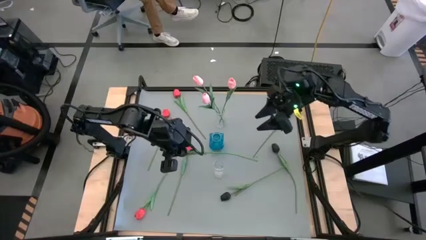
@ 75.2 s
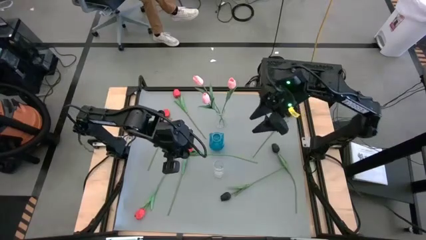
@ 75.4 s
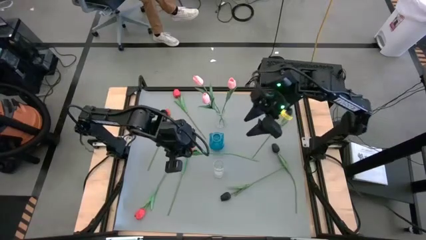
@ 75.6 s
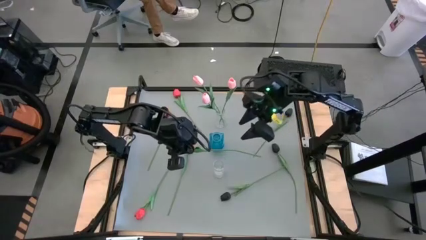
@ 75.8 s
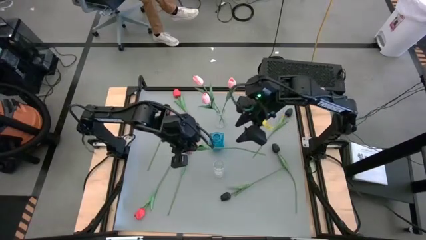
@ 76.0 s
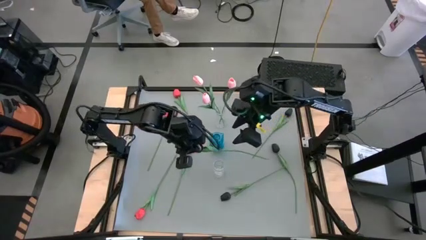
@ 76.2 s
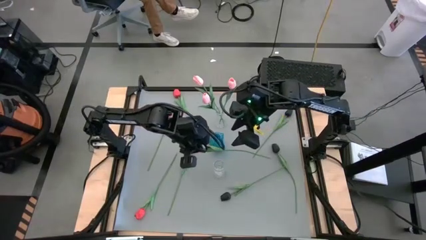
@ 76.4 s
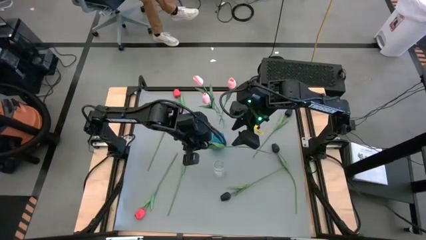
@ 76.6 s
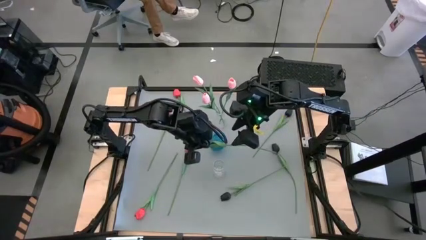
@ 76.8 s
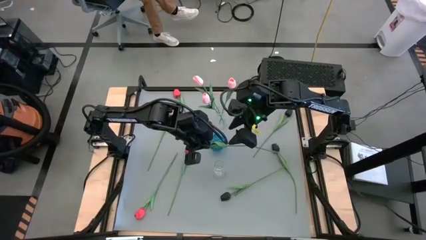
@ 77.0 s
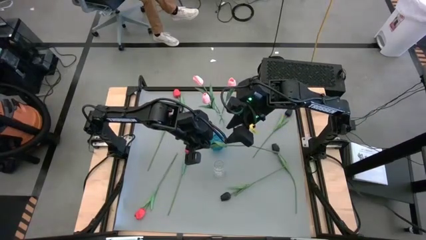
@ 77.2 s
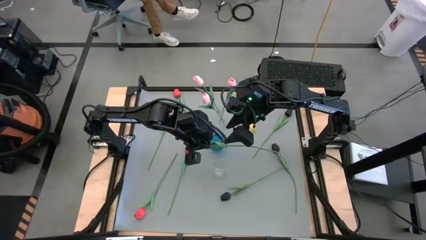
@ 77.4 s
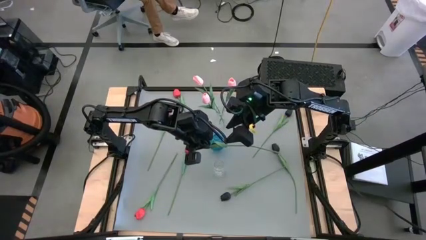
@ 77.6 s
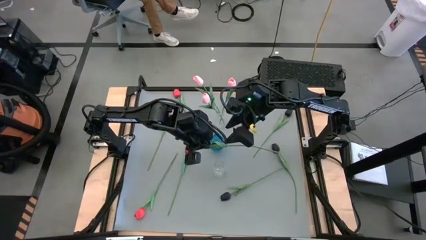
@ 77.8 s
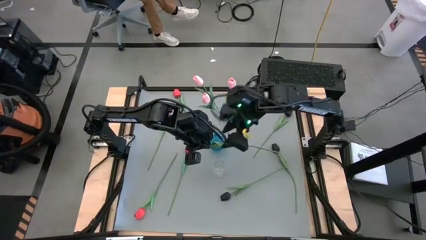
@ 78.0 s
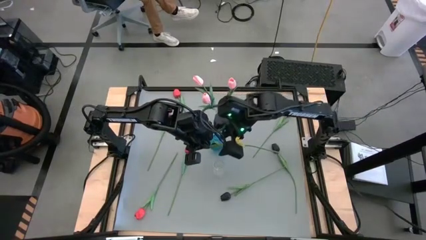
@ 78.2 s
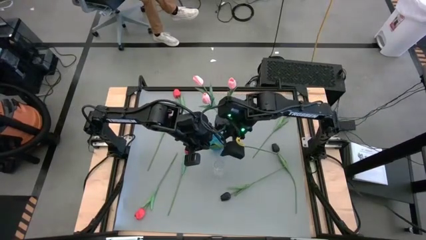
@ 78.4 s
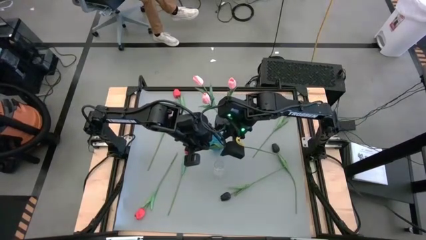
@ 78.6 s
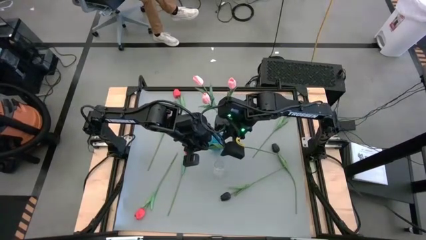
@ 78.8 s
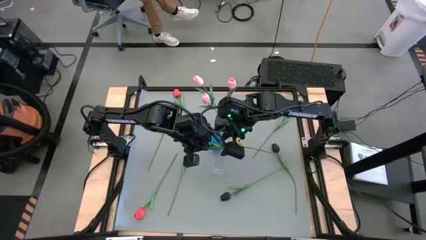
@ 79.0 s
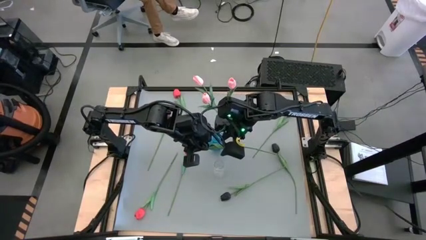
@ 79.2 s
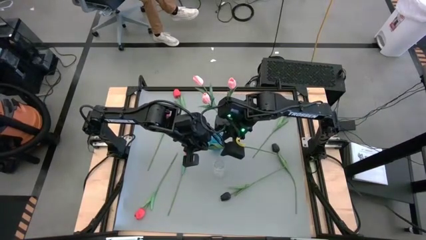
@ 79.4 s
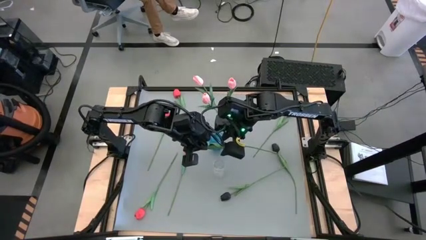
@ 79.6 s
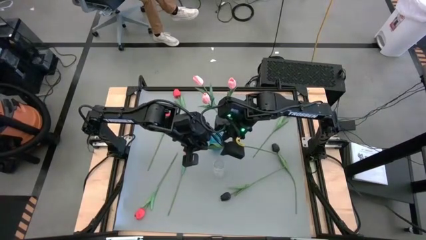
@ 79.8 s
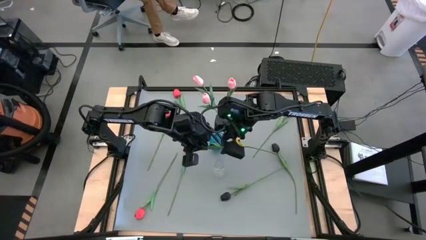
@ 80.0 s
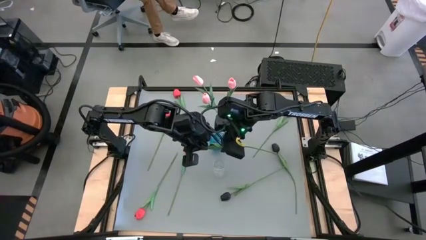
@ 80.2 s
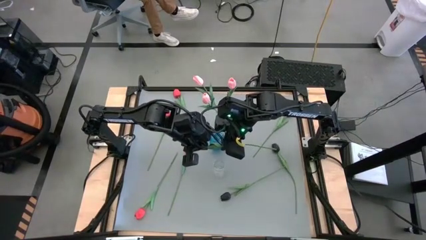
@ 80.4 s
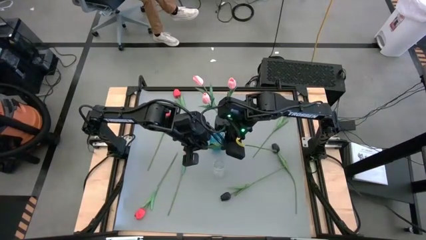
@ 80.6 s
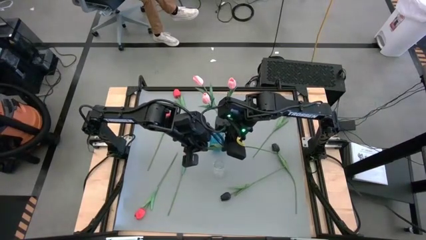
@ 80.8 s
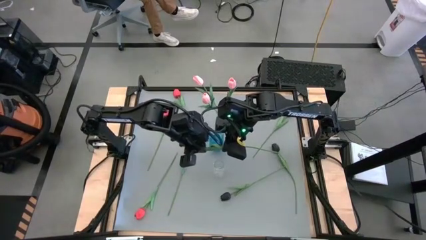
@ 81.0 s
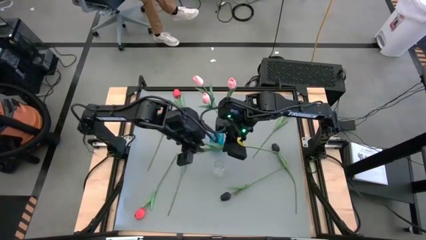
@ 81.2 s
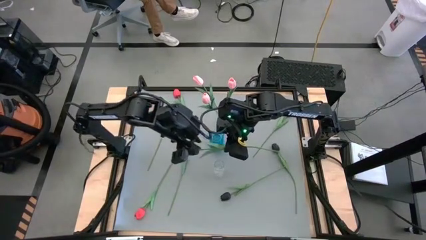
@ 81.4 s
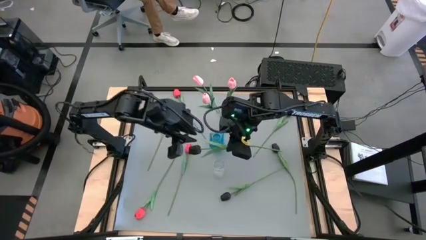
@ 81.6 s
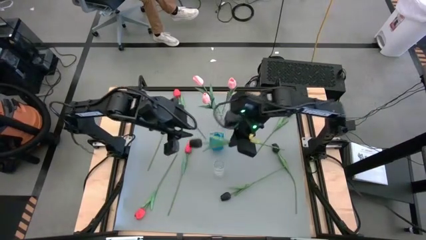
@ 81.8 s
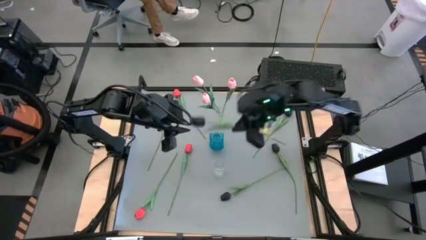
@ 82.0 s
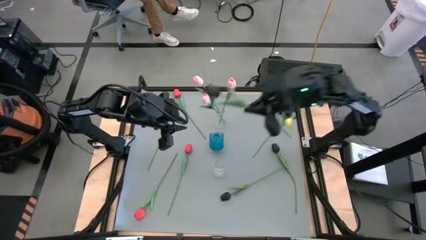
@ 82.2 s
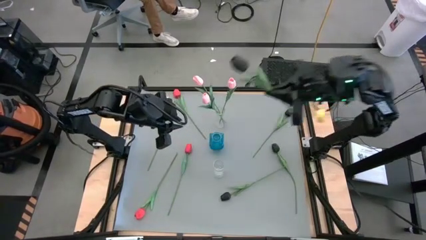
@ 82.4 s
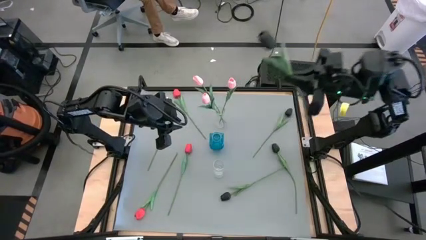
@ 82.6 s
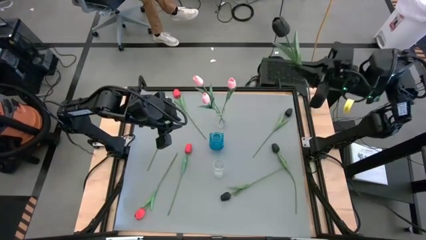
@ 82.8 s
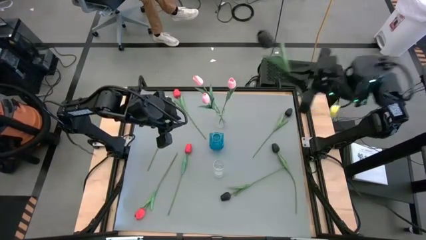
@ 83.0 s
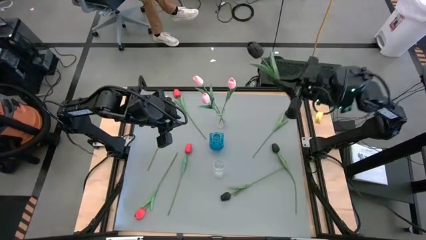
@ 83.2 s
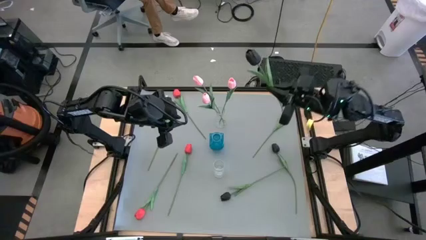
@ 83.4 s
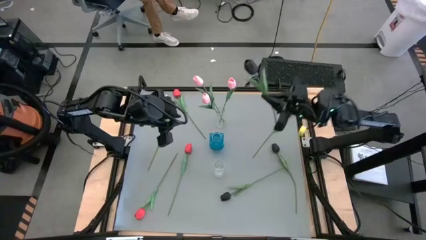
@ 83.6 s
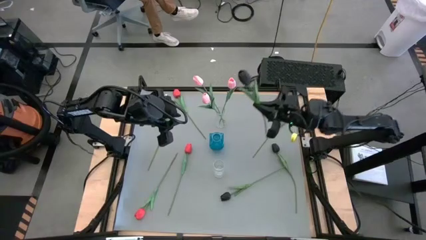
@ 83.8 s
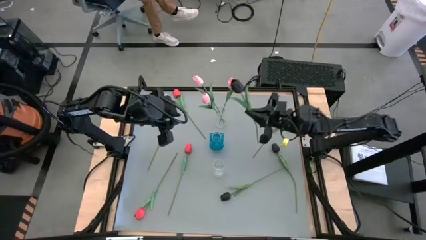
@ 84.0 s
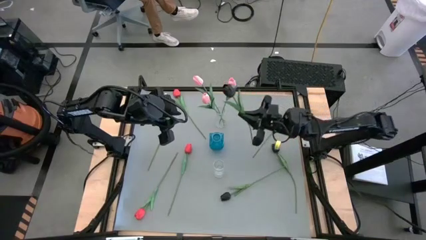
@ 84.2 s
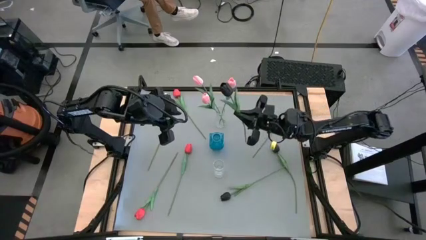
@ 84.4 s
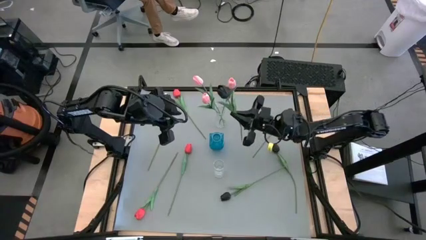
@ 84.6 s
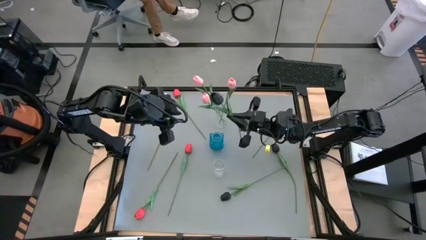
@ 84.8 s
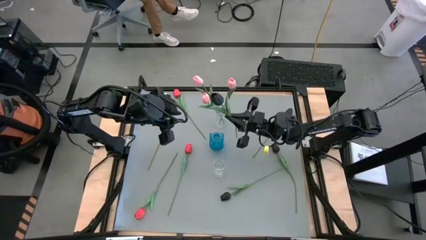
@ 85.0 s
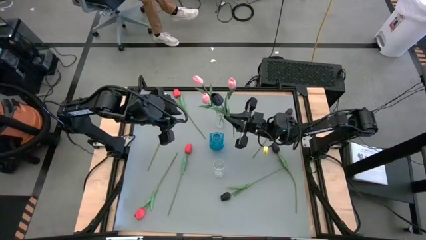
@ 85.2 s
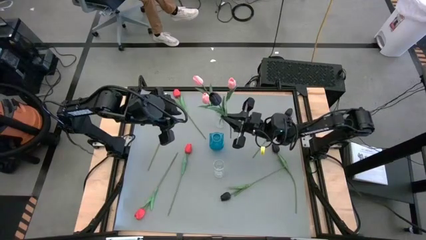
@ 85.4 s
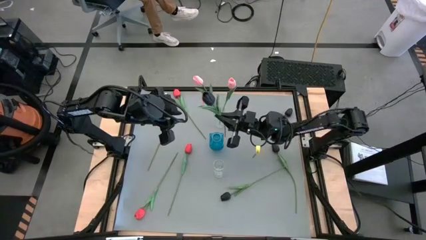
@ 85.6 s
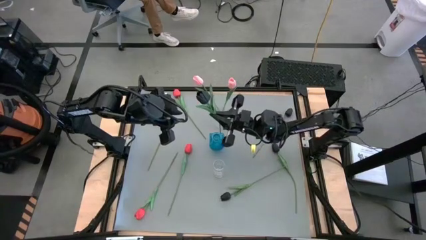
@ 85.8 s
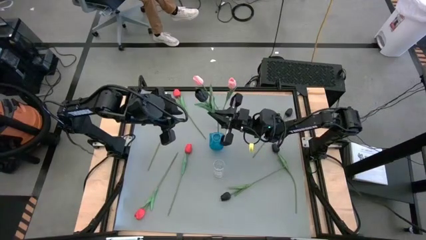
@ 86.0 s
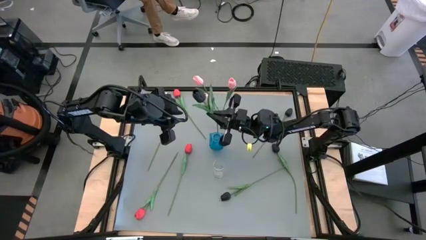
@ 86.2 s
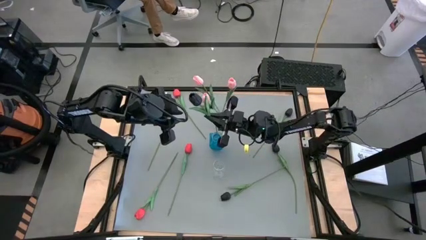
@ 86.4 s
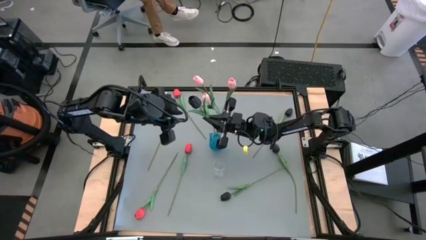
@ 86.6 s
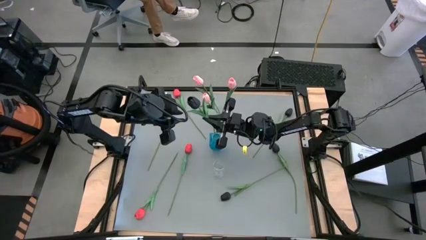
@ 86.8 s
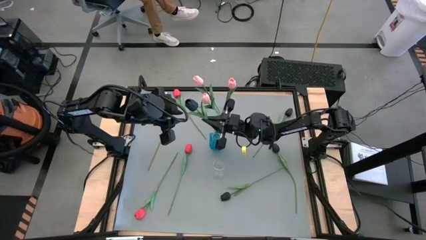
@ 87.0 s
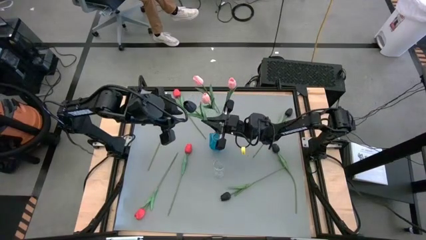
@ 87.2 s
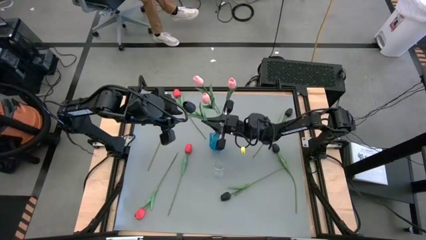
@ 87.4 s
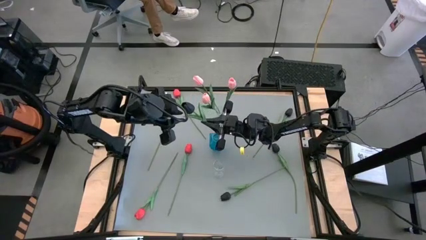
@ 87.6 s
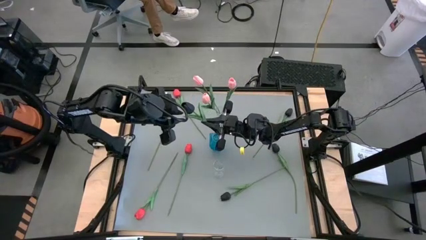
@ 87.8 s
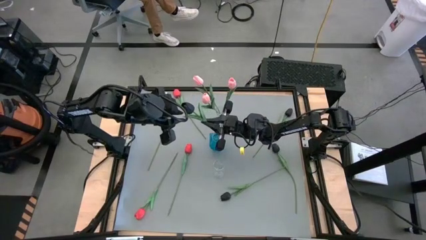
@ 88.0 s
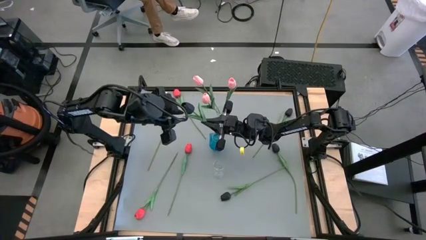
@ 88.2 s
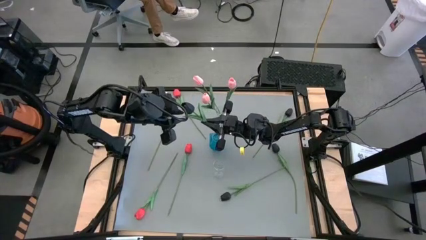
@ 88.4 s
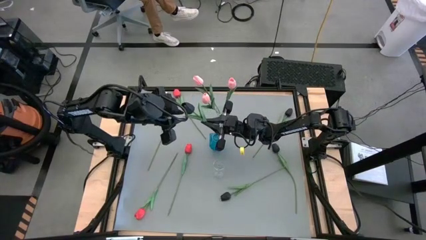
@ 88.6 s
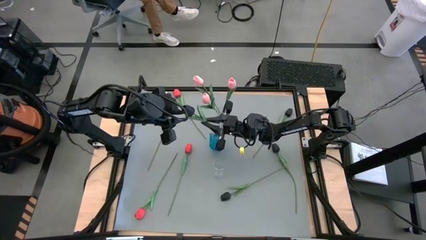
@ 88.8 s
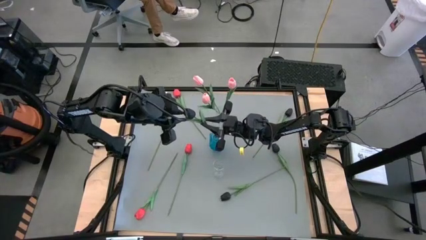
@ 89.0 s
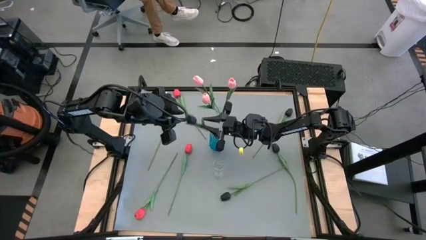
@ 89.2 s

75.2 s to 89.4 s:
Task: Sort flowers into vase by color
Put the bottom left black tulip into the blue vase
